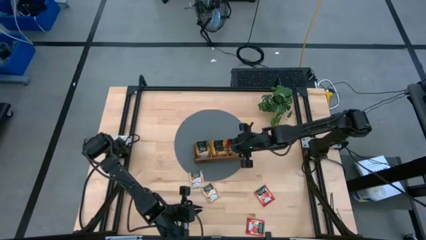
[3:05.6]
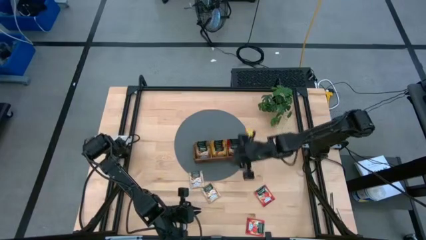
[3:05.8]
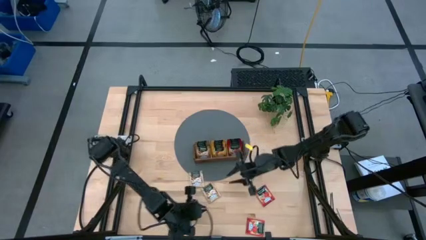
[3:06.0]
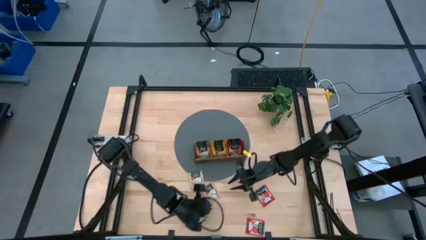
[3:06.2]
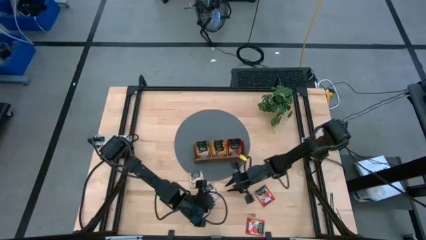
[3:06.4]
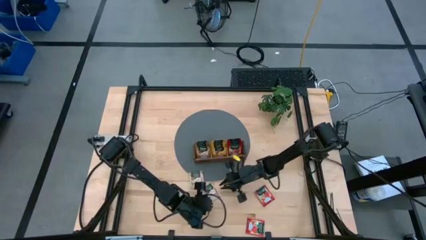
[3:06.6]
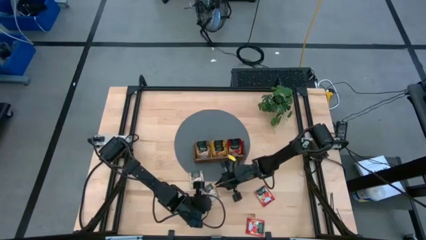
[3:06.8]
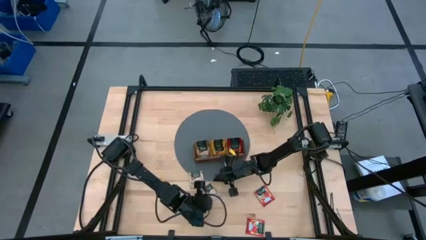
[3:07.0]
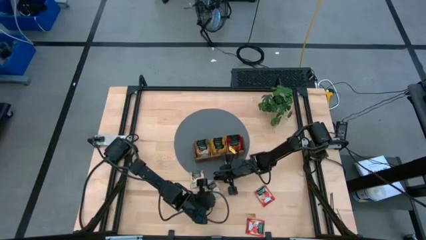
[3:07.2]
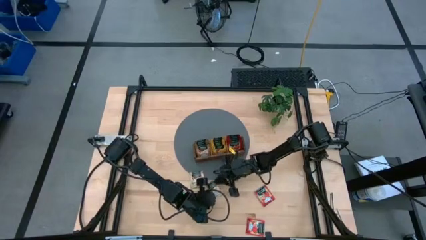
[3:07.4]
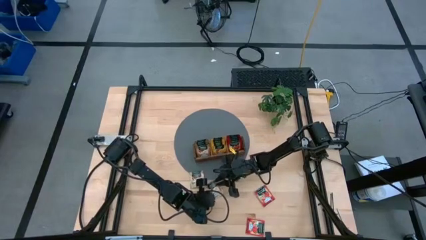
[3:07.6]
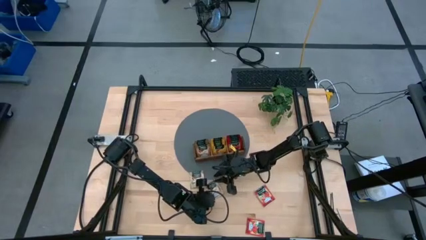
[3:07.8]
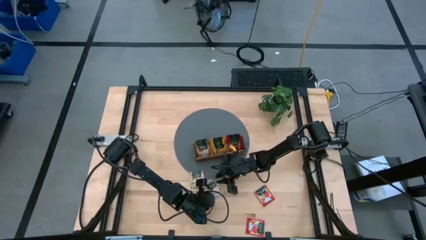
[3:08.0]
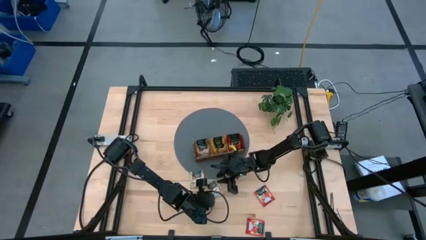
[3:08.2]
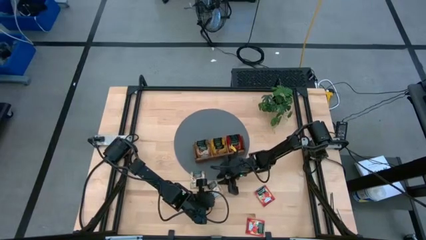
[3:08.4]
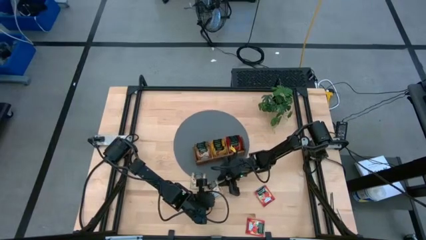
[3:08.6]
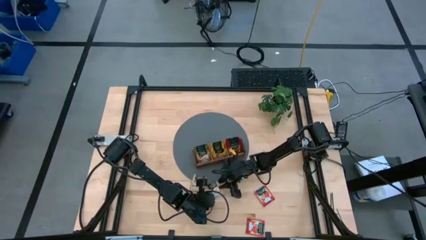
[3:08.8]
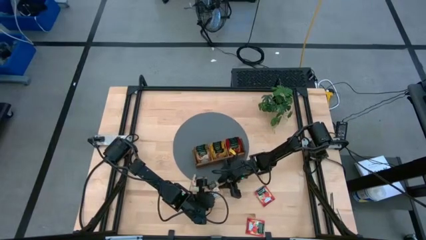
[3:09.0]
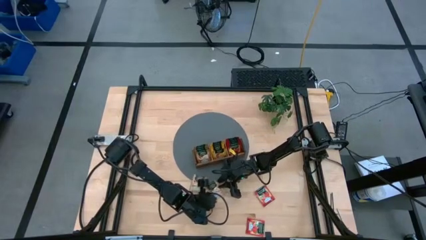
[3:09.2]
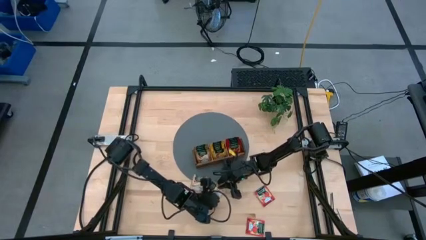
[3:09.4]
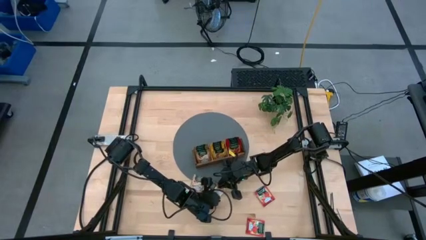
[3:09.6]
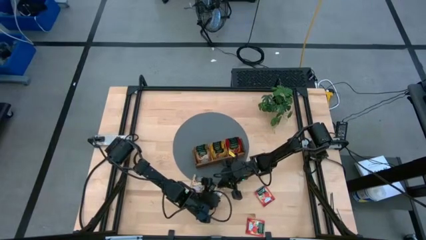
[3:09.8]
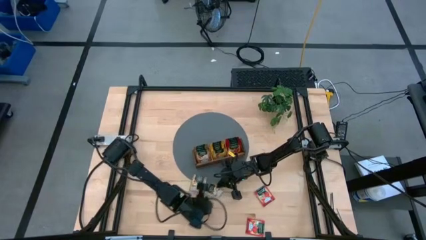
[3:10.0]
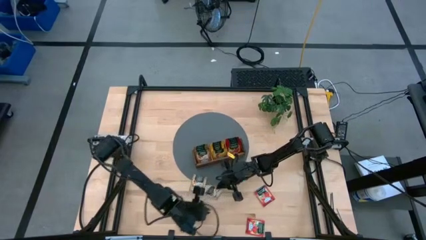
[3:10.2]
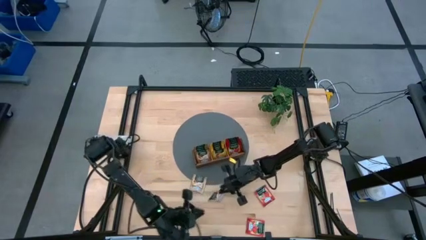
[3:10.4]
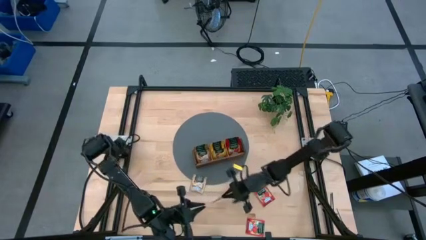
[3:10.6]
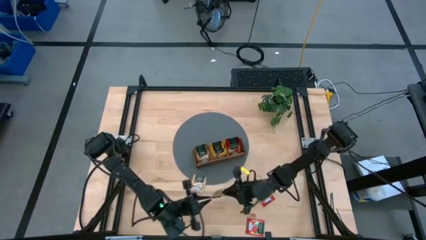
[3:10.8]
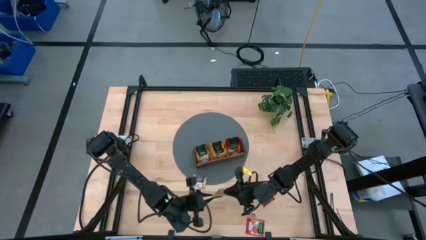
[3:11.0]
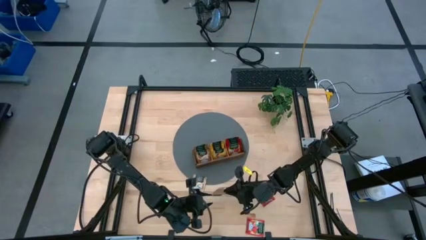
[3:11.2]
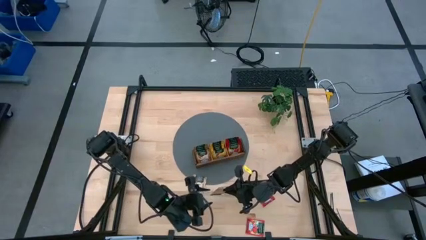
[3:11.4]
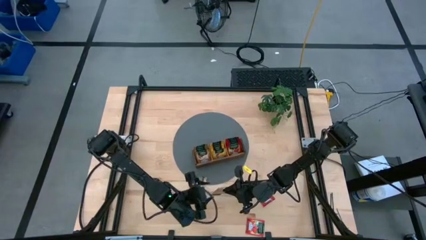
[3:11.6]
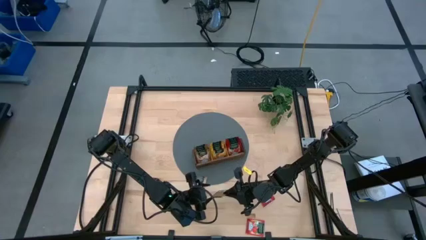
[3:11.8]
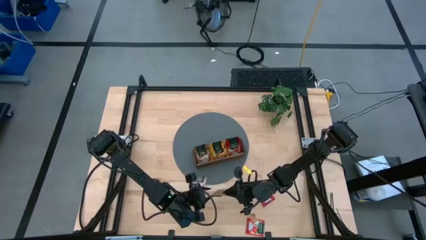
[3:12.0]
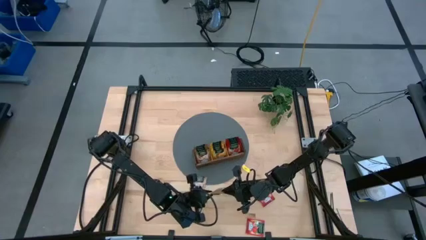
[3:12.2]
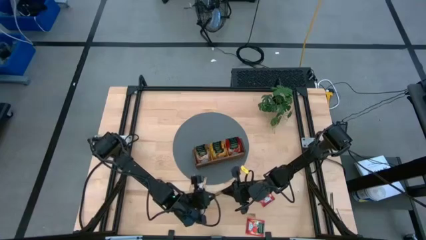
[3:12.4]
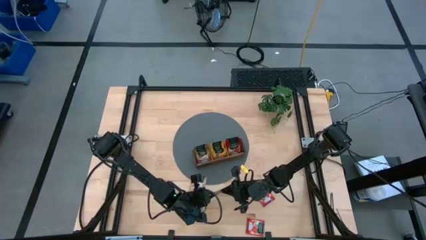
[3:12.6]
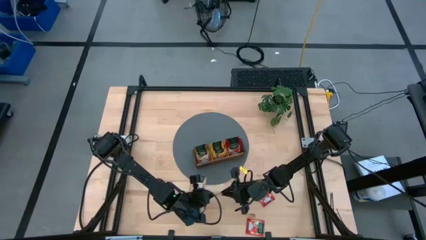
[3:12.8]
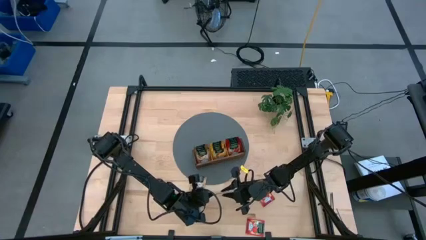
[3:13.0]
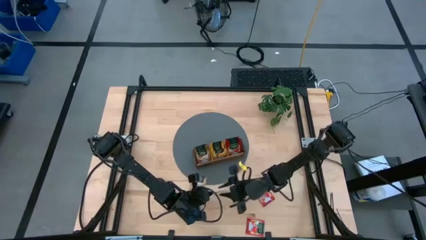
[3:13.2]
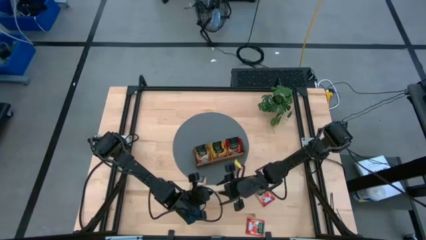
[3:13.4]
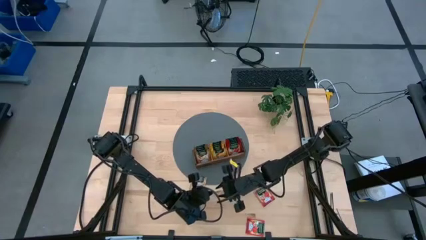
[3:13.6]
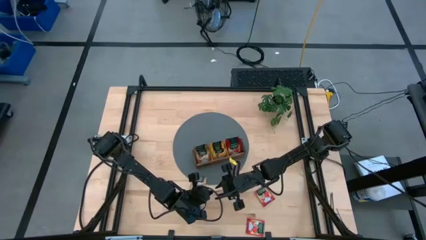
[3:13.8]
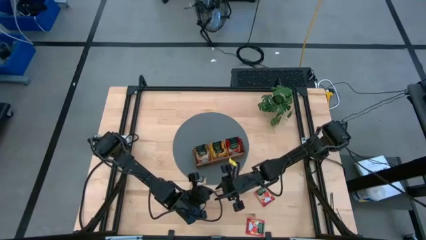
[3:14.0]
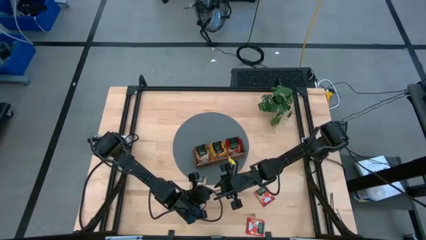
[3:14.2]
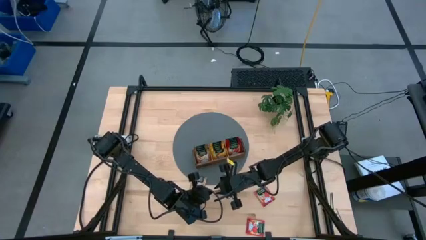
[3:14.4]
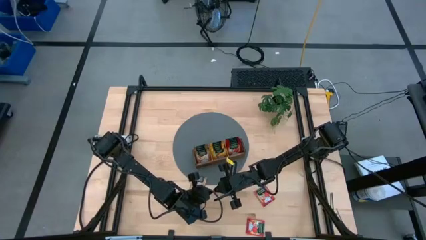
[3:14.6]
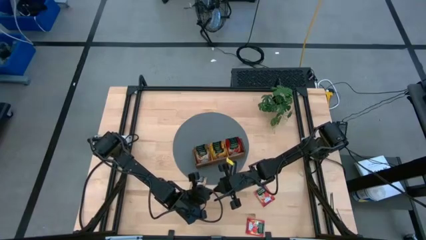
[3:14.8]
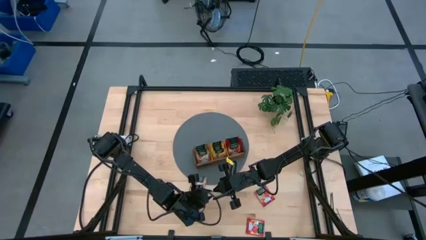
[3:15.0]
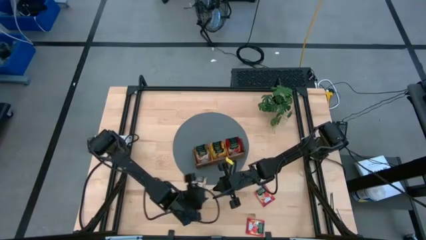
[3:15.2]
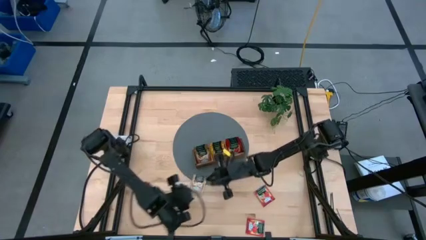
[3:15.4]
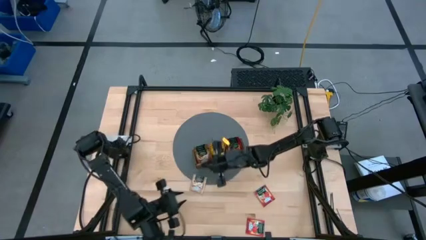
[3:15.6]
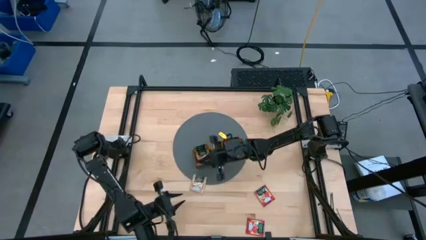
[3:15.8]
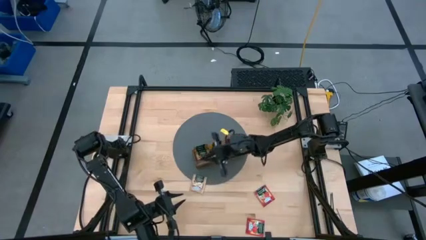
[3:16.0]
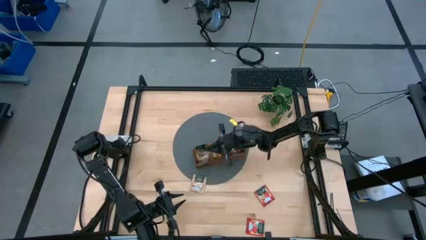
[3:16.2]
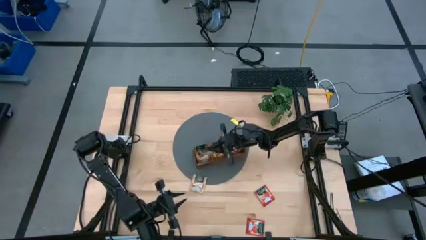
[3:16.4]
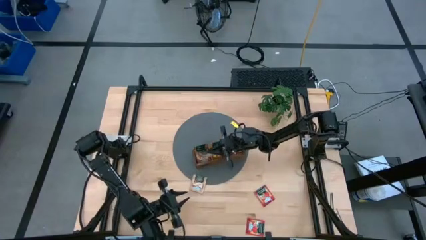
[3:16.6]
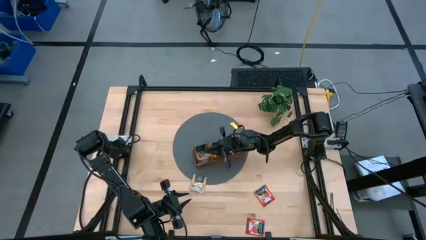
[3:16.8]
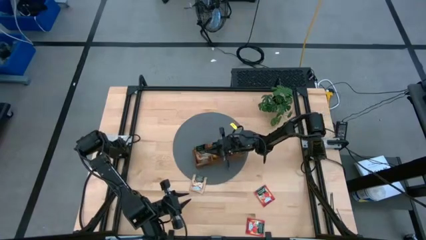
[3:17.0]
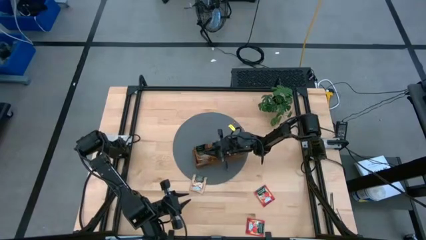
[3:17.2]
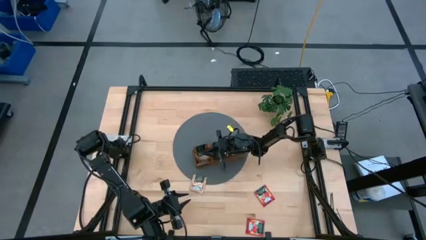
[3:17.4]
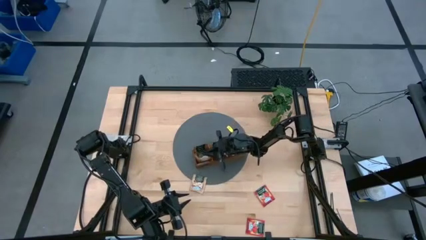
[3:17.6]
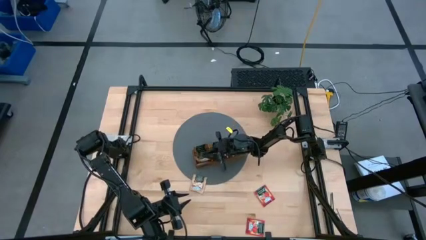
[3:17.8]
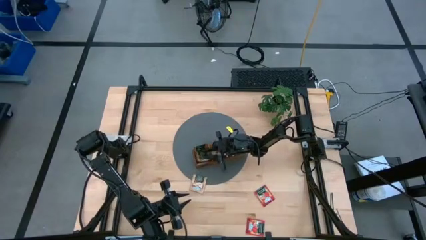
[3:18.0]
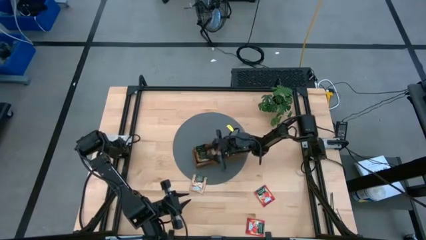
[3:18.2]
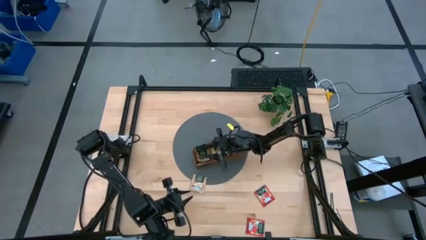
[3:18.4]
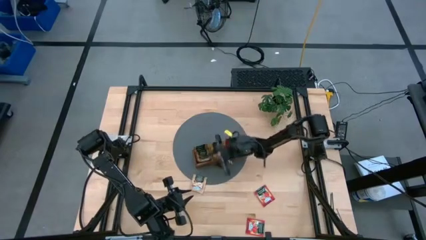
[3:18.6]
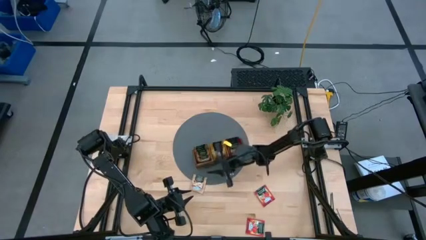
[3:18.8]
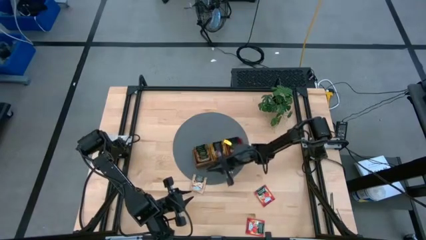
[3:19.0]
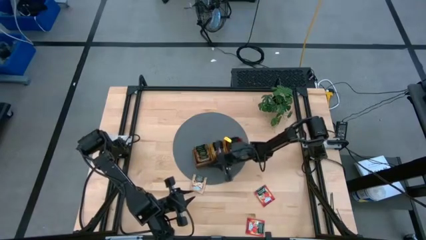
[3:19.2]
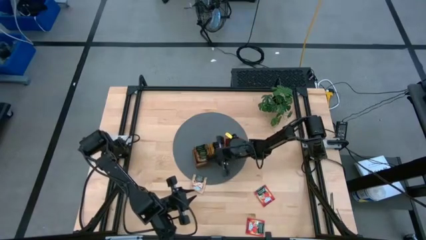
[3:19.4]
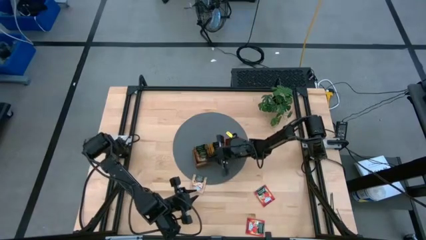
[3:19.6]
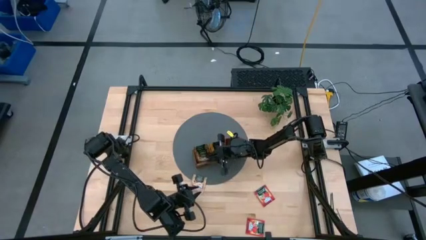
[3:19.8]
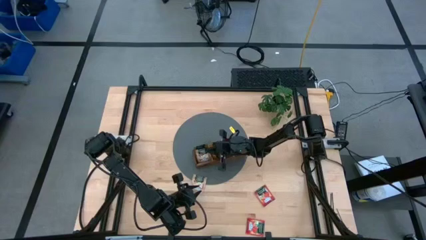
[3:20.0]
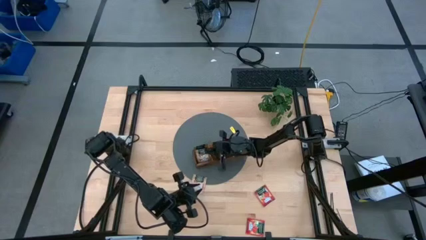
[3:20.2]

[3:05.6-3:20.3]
Task: Pick & Place Tea
Put the right brown tea bag into the left section of the wooden organizer

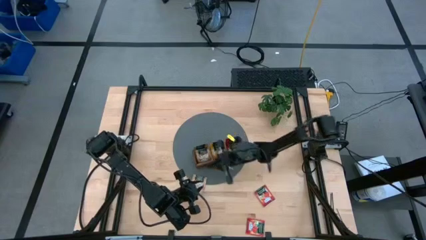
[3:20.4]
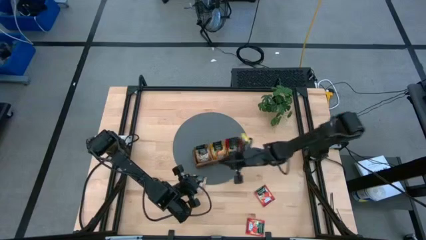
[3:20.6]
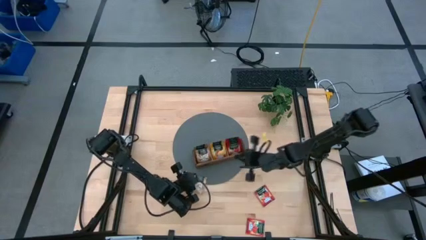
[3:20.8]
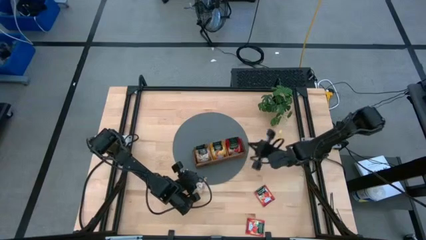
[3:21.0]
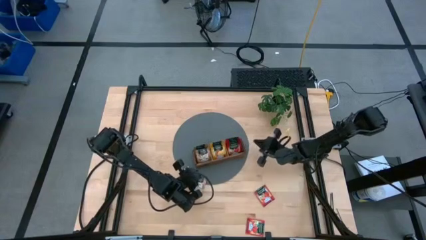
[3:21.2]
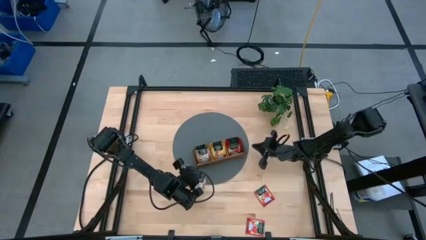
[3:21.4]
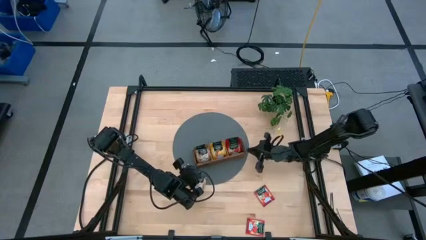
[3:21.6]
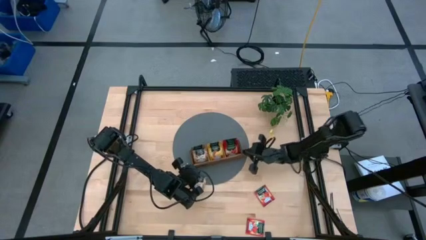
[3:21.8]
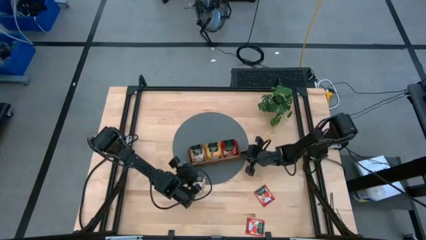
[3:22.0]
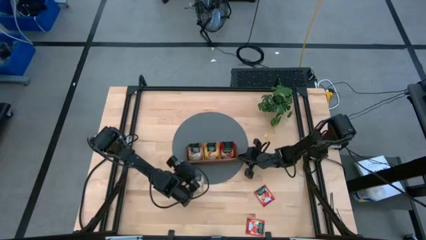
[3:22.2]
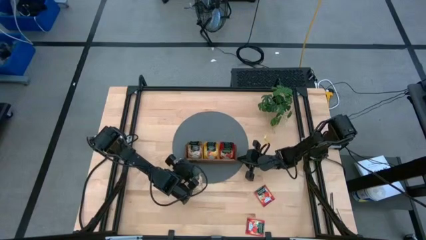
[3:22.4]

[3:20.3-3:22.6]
Adjust the wooden organizer
